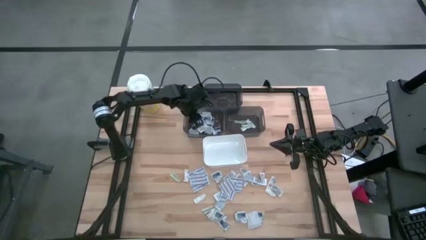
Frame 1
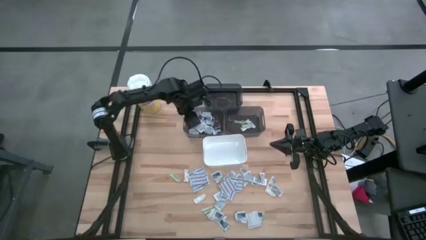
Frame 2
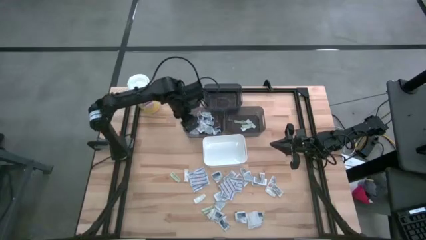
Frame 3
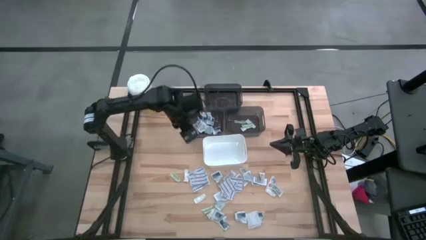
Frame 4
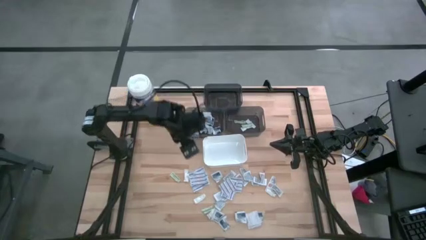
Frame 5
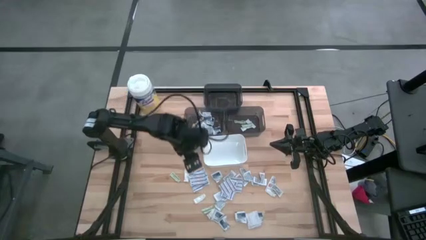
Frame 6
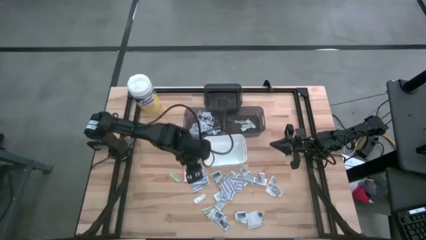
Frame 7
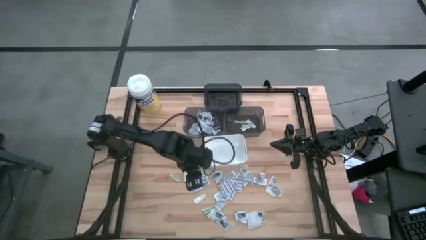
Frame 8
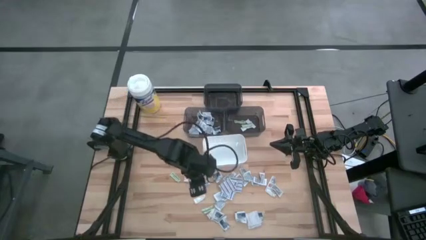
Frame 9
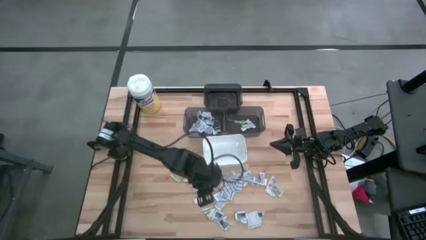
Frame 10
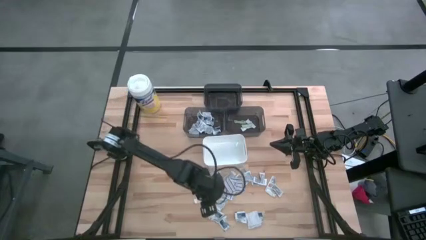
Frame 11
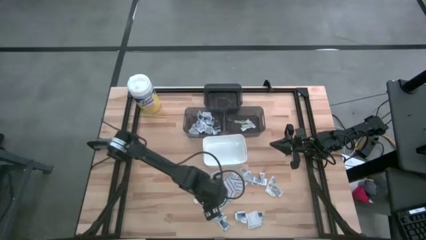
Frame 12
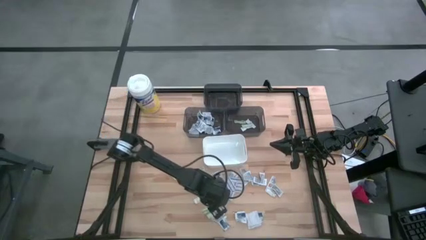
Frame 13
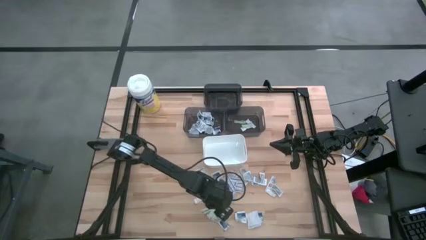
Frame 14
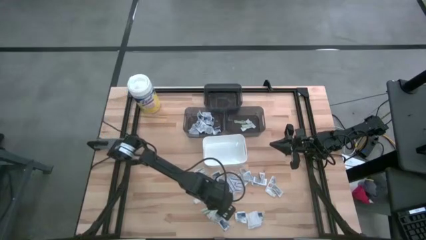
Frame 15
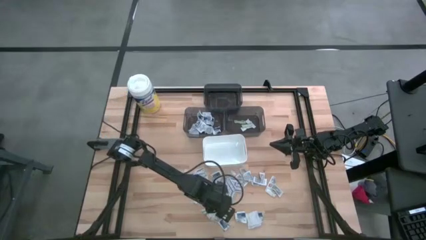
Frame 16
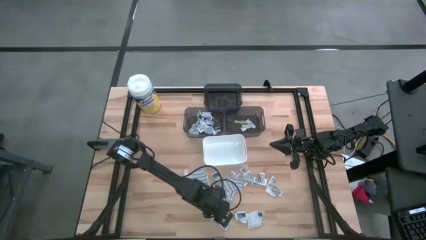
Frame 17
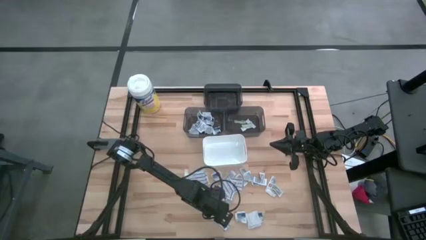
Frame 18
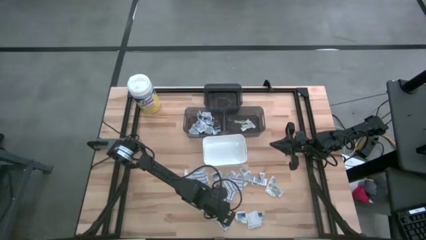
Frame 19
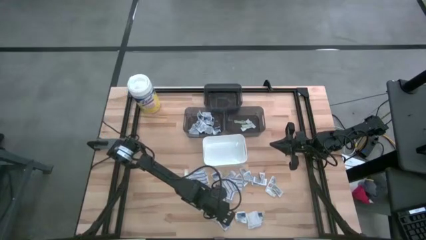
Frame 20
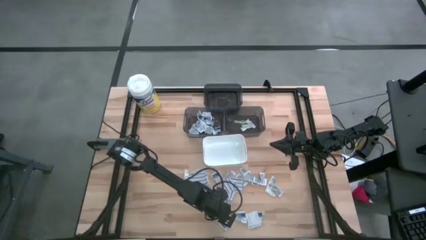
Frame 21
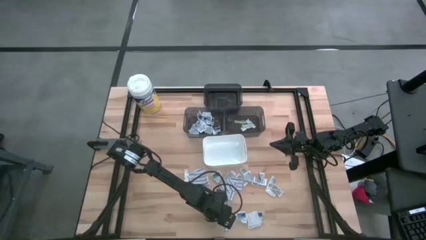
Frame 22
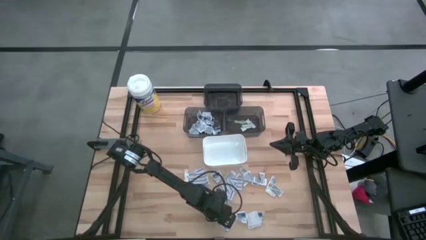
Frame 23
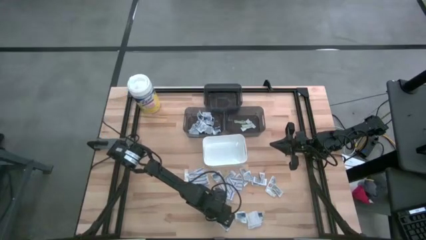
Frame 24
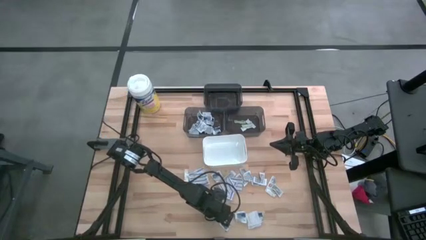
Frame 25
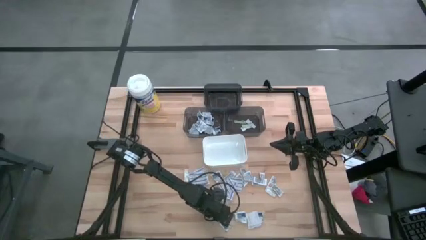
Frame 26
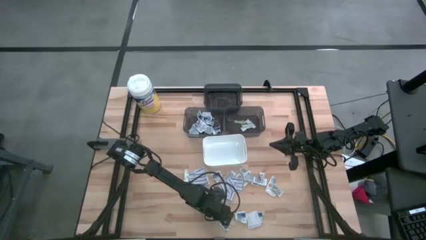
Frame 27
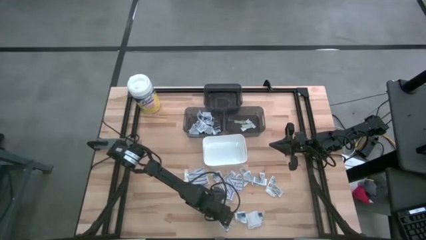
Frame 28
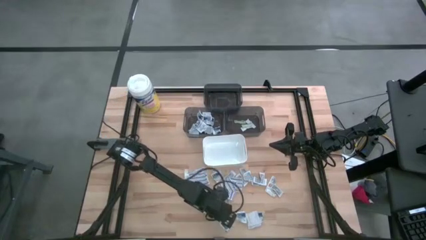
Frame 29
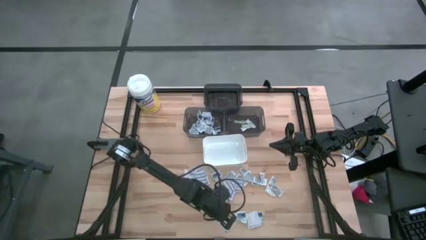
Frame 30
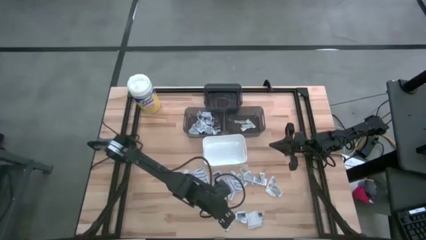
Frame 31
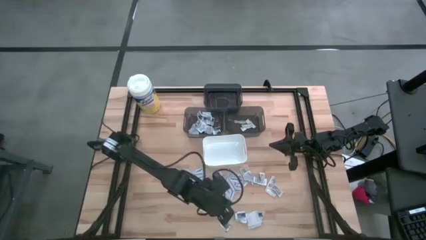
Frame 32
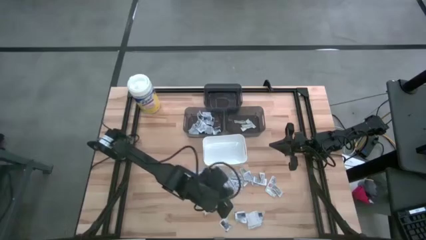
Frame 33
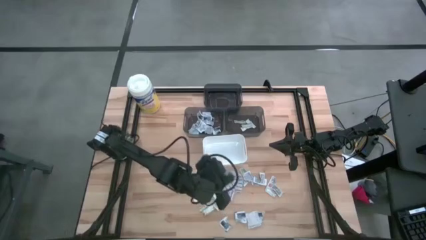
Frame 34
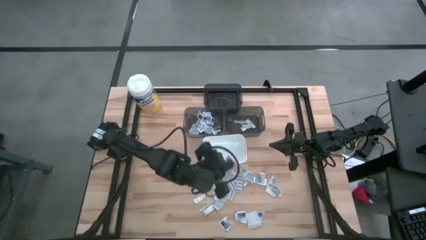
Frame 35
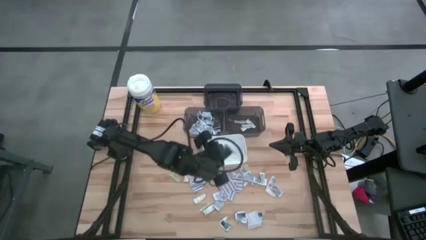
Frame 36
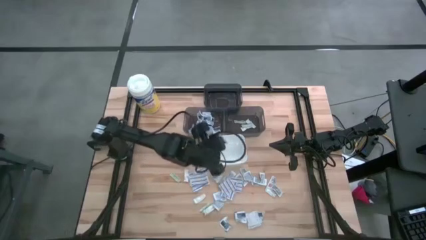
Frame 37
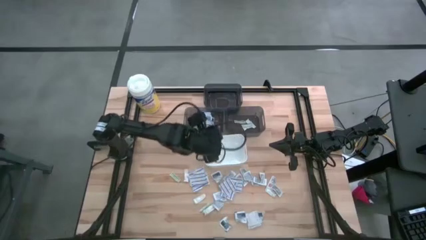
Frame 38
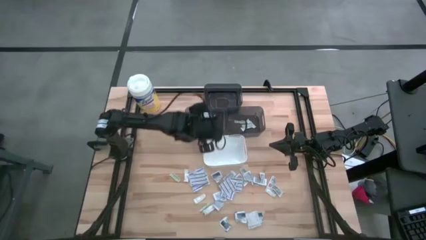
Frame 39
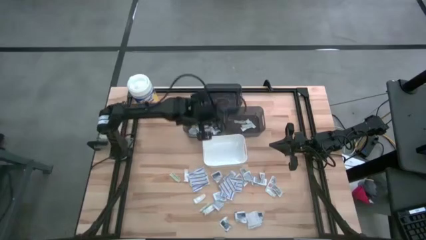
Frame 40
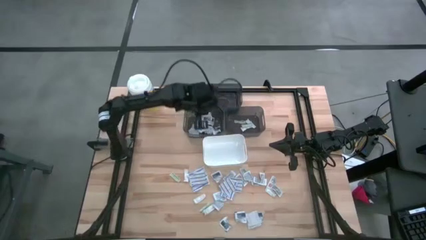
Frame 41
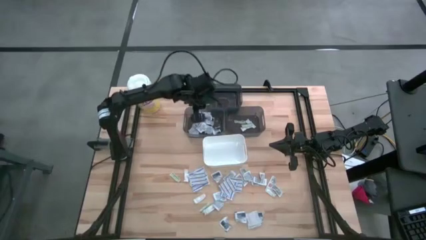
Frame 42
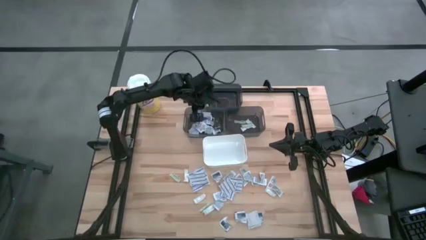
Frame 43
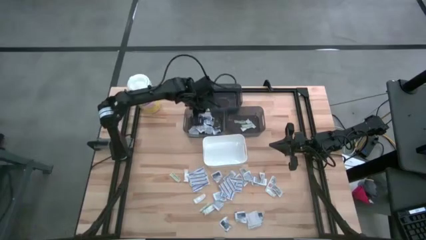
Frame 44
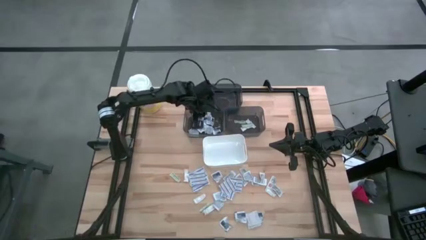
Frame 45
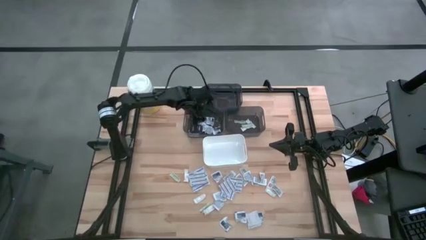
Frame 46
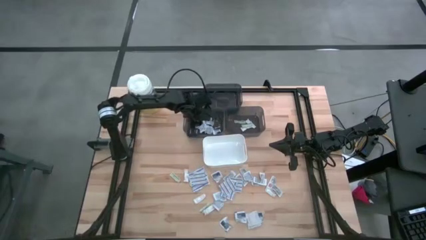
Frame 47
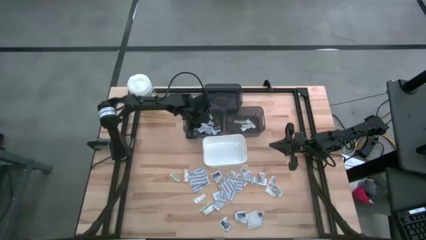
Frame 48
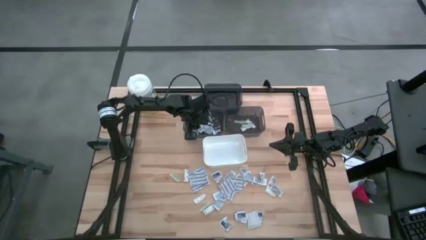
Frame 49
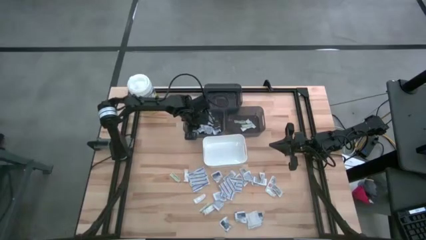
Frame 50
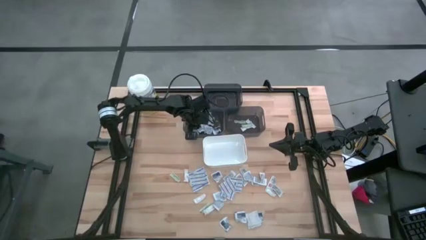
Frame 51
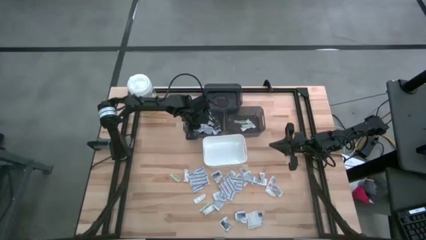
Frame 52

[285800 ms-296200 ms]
Task: Pick & Place First Aid Supplies
Put the alcohol pad into the bottom left black bin

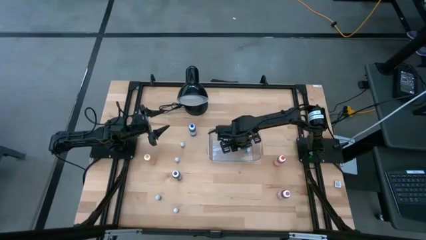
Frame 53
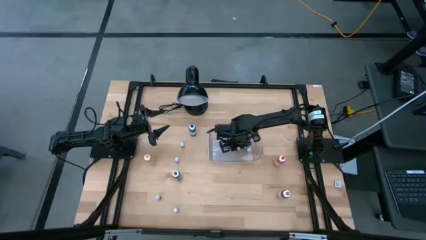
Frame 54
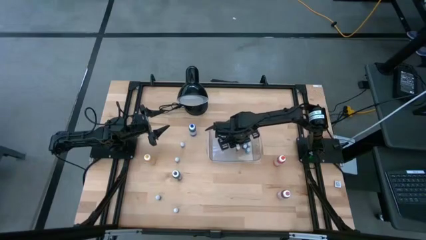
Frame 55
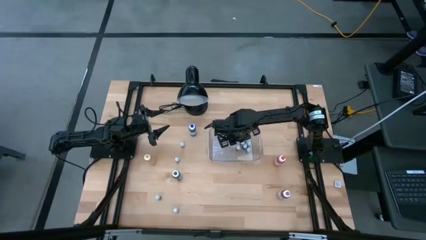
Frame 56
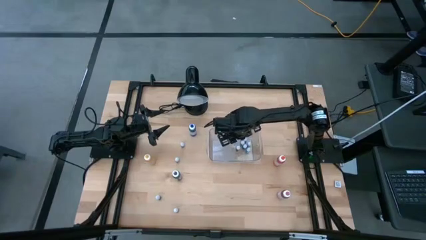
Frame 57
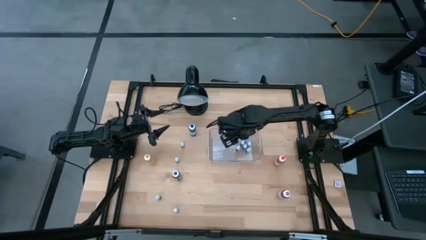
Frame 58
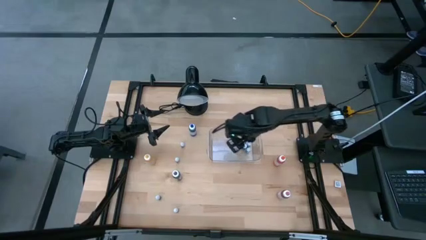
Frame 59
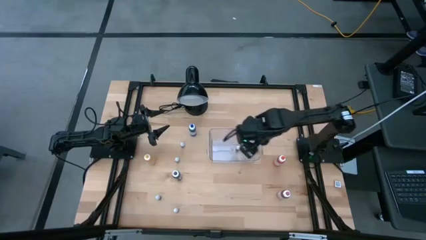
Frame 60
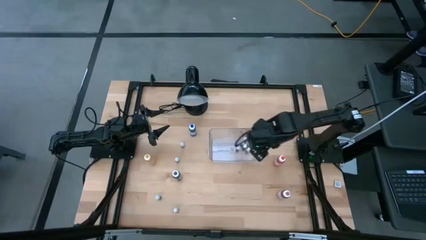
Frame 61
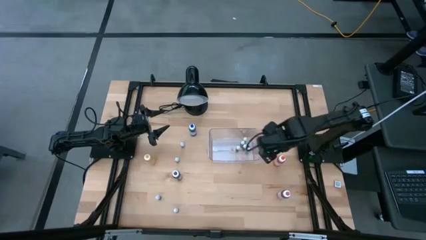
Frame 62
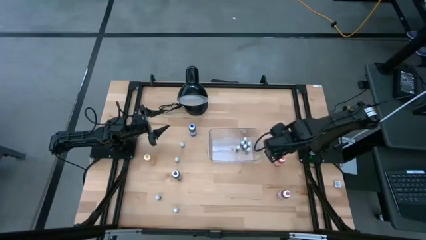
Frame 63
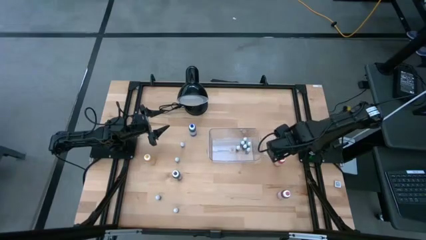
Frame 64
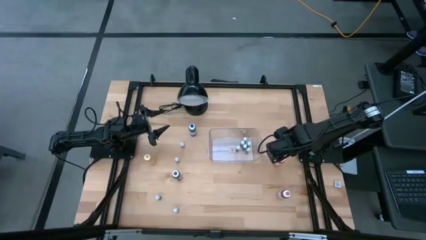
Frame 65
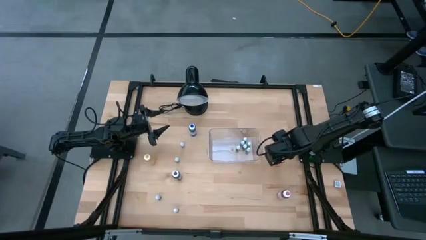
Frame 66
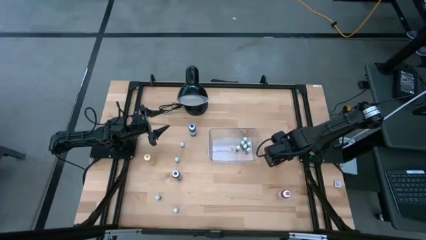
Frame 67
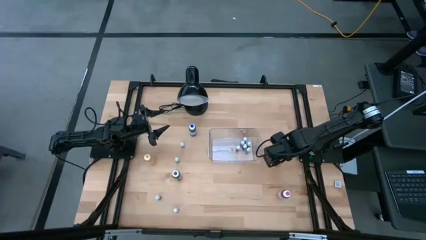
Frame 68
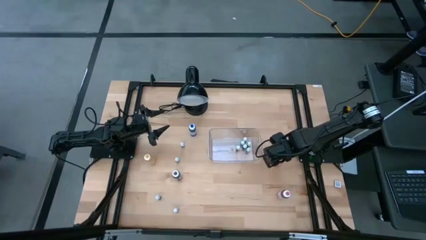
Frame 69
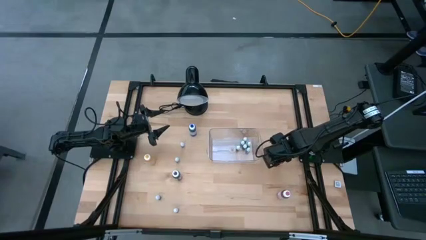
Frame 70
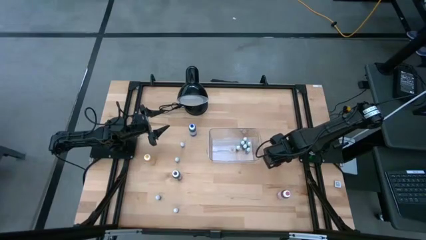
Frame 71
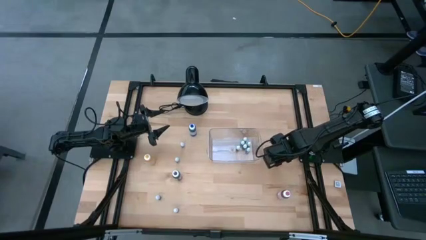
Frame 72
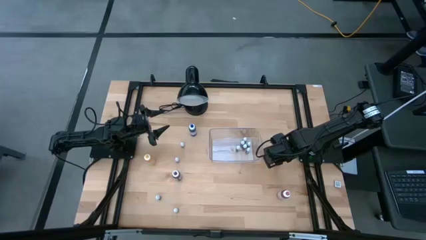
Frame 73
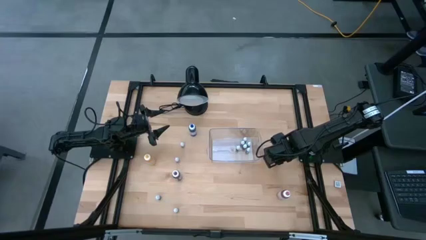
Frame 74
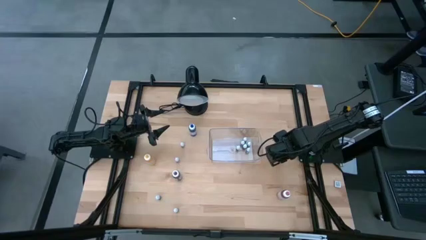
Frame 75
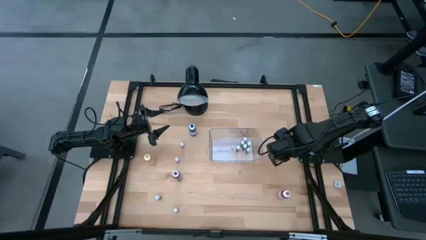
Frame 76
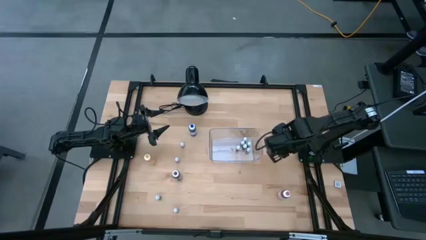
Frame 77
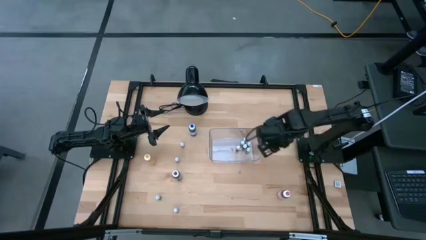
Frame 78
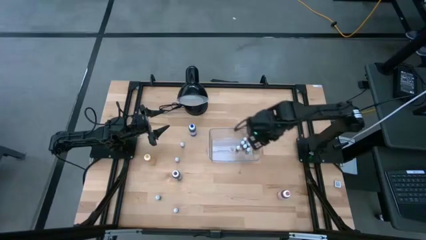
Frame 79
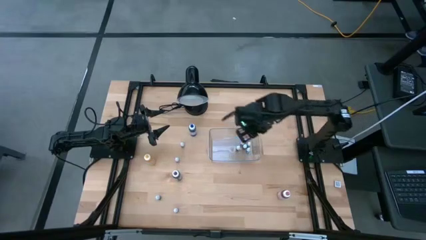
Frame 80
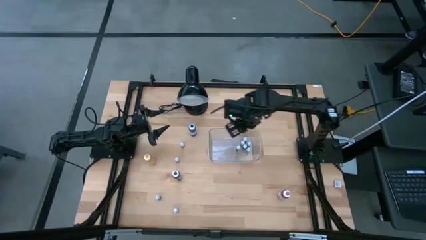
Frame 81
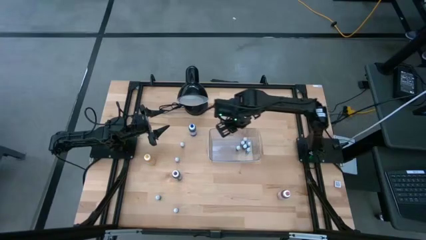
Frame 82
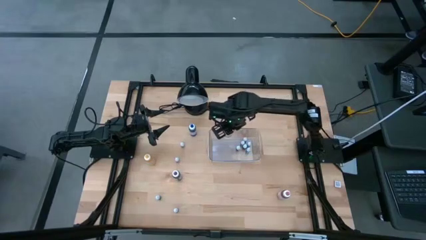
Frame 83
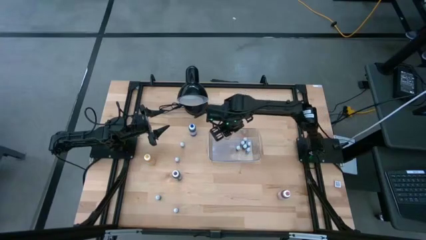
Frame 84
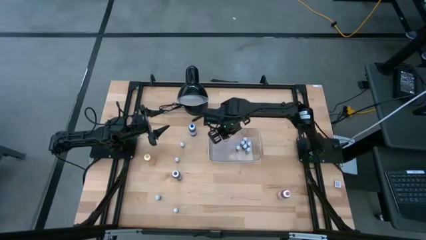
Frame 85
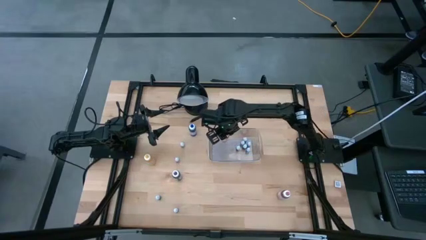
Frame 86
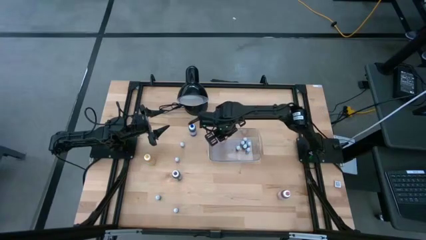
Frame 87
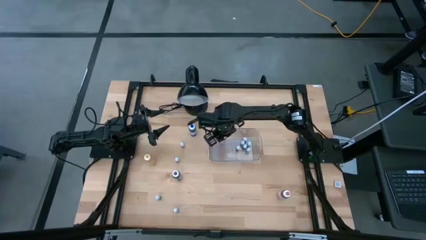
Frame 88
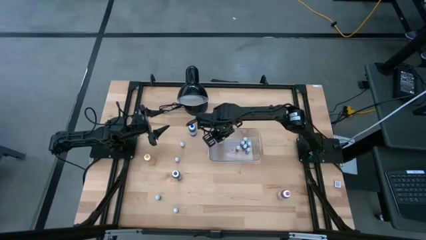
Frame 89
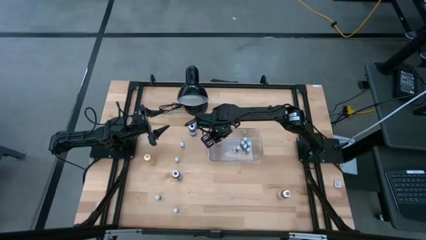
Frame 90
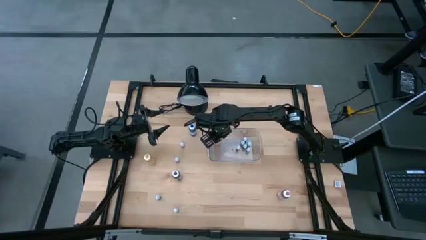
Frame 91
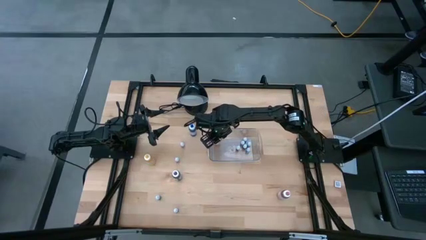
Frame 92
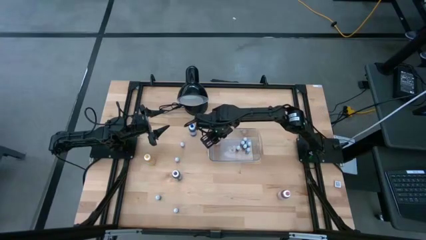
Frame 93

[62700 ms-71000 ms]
Task: Pick & Place food coloring
Put the big orange food coloring bottle into the transparent bin
